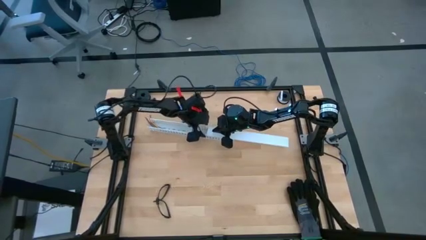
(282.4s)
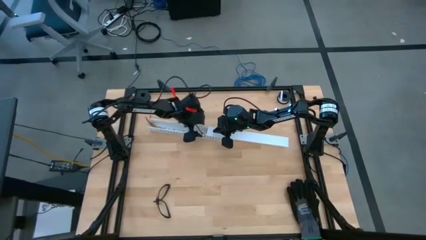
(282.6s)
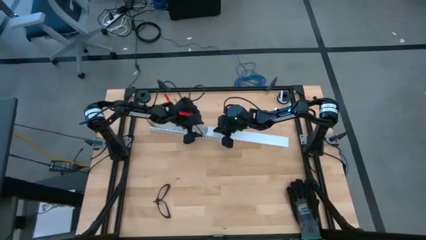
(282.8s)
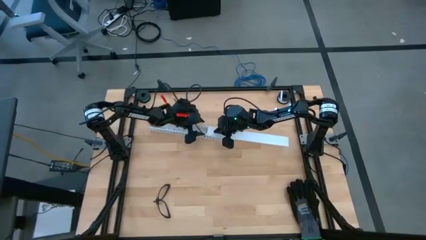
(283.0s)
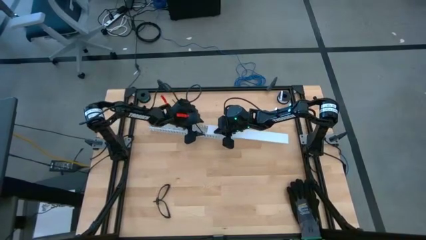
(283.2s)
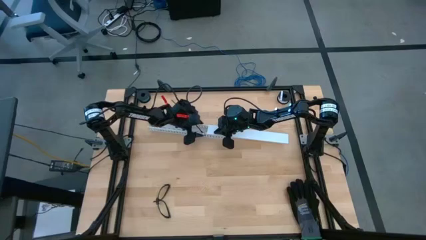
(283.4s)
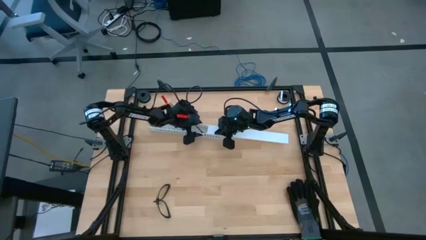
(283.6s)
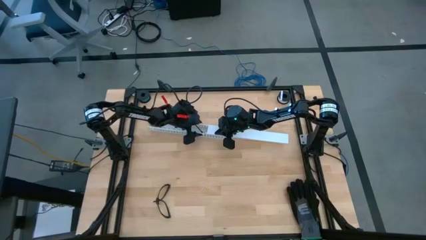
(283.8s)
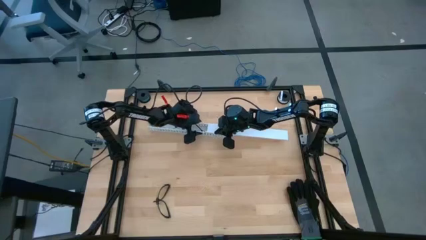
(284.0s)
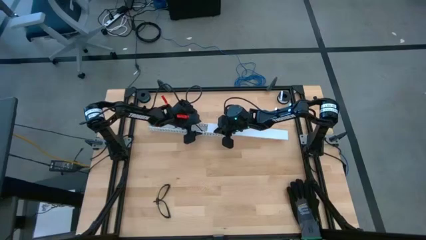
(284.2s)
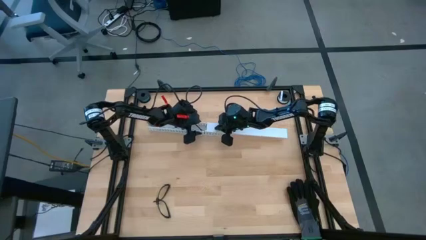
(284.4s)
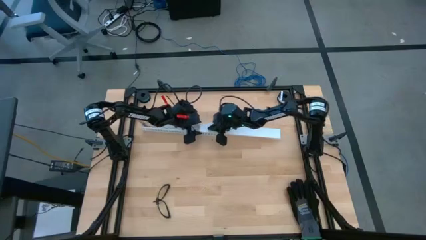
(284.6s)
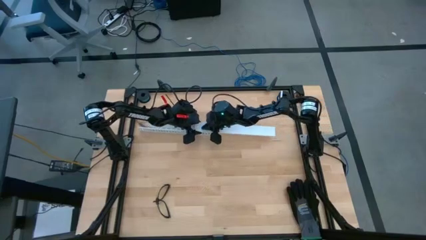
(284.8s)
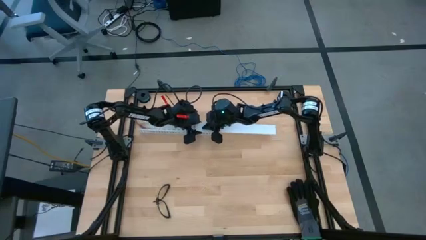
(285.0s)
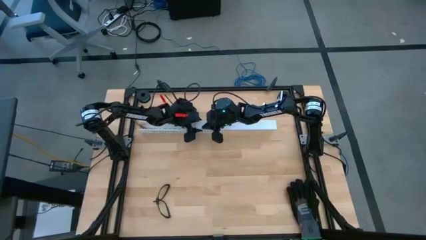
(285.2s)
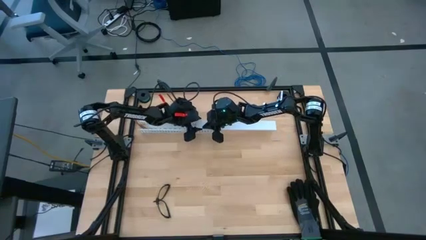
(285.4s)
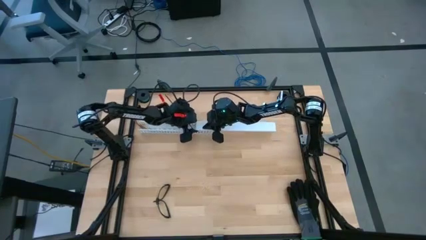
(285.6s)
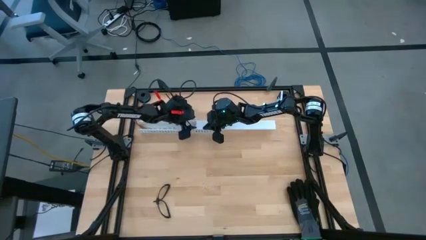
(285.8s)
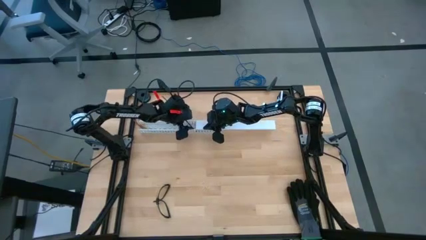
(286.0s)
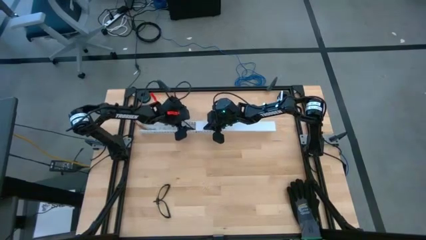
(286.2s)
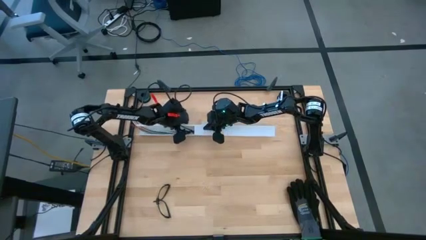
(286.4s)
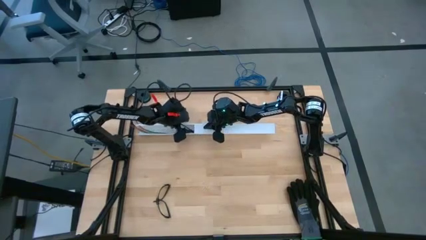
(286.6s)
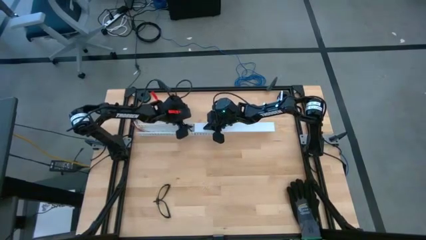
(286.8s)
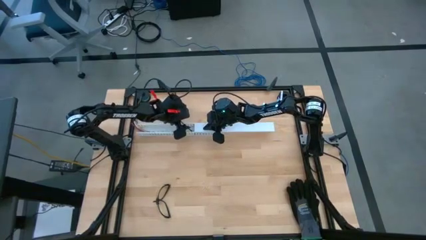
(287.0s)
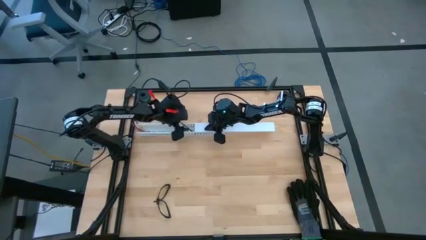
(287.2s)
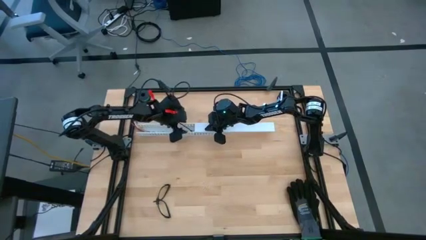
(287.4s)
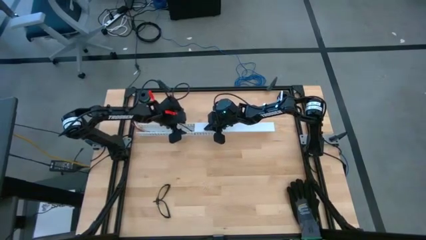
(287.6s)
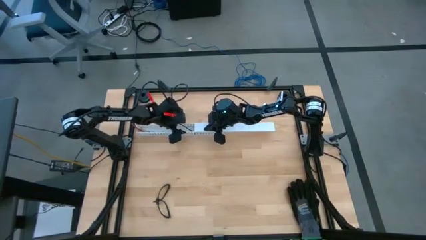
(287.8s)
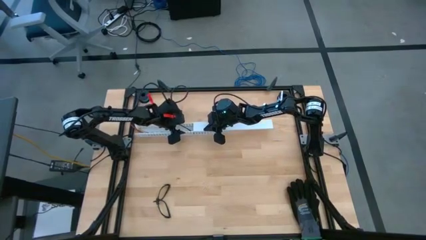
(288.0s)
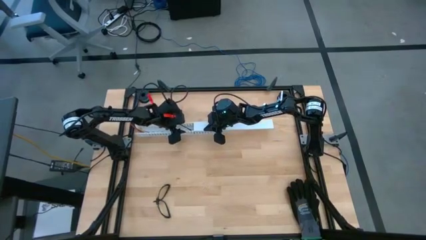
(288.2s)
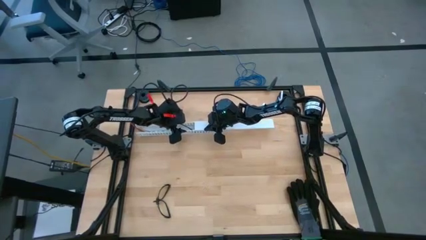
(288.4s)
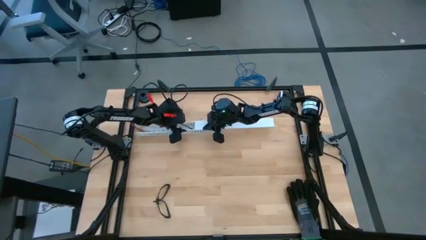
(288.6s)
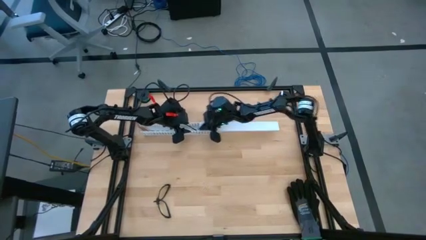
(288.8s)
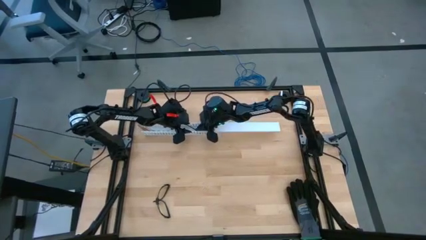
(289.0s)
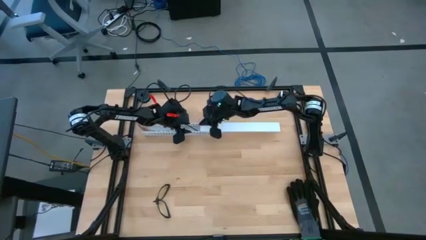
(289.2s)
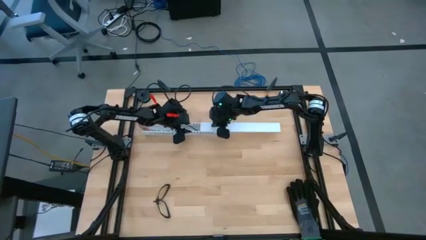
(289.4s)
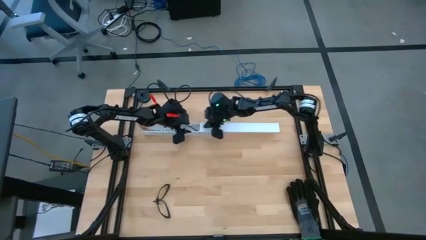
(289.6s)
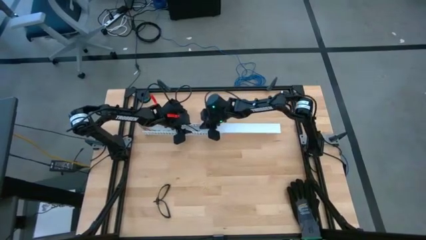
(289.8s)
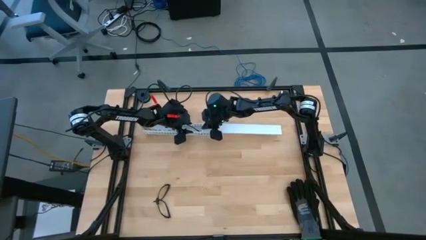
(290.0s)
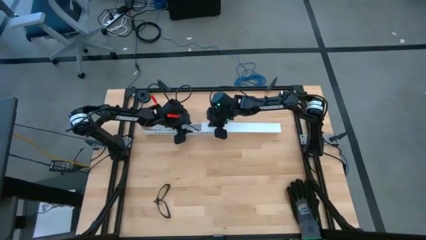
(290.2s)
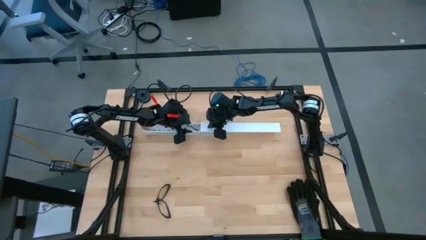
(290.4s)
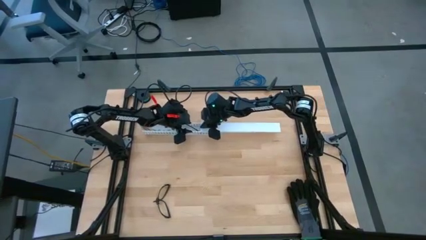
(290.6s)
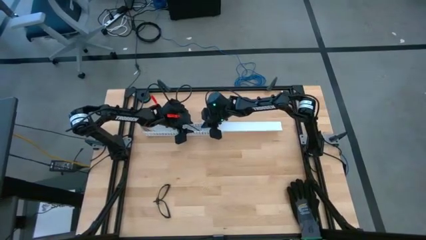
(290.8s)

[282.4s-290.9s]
Task: Ziptie cables
Close the white cable duct lid

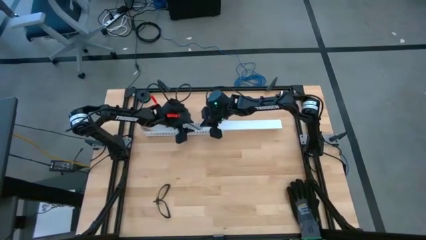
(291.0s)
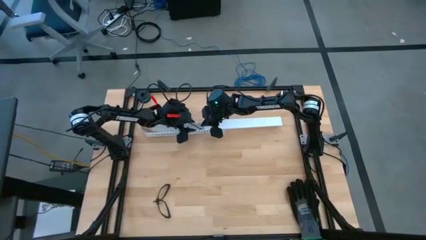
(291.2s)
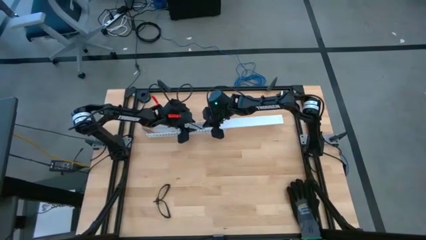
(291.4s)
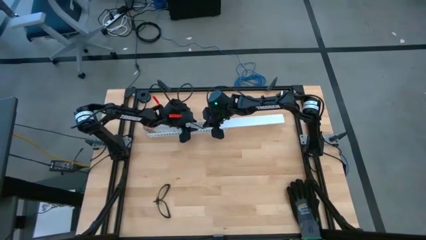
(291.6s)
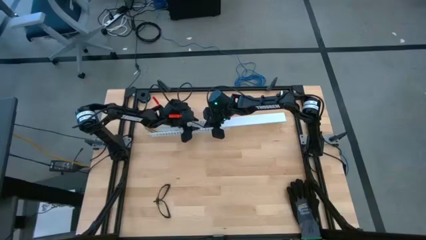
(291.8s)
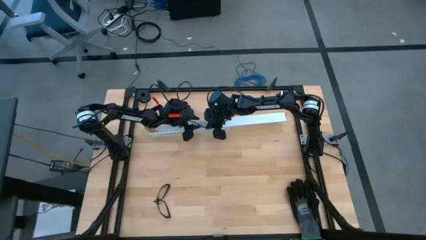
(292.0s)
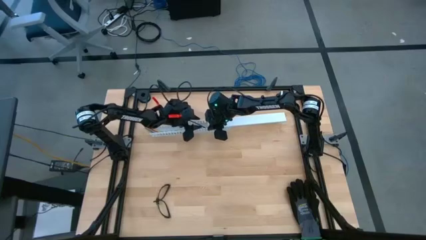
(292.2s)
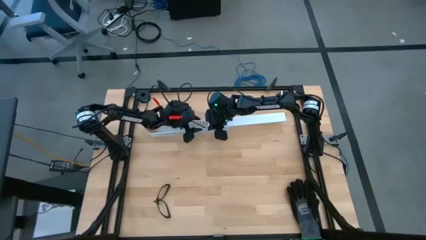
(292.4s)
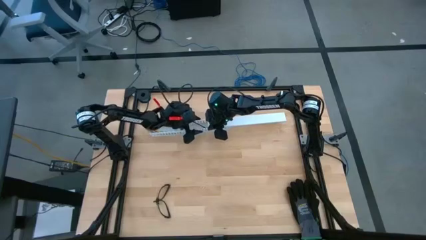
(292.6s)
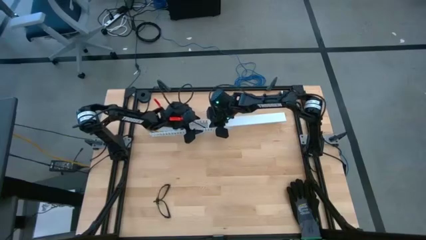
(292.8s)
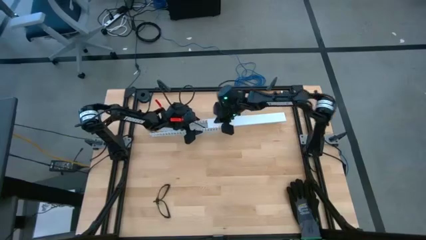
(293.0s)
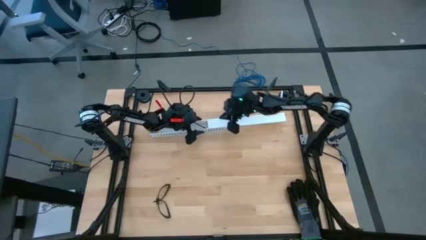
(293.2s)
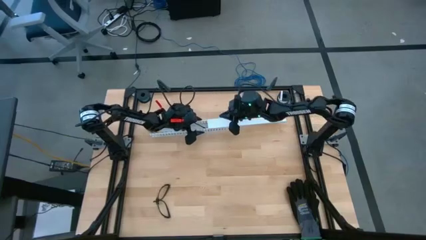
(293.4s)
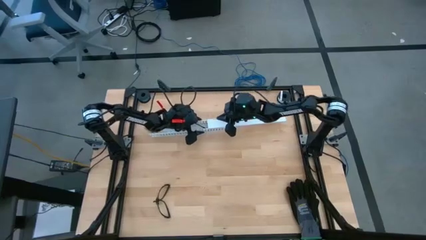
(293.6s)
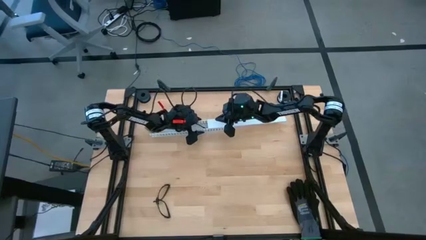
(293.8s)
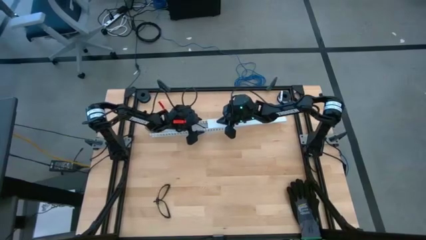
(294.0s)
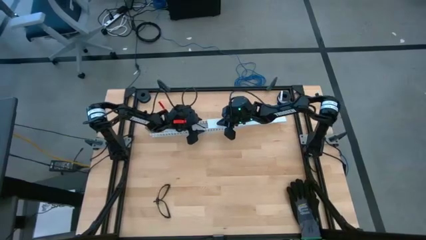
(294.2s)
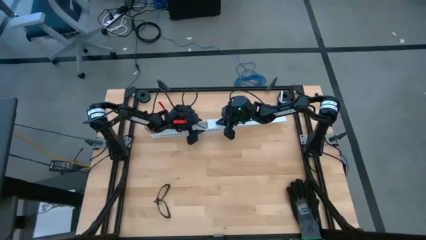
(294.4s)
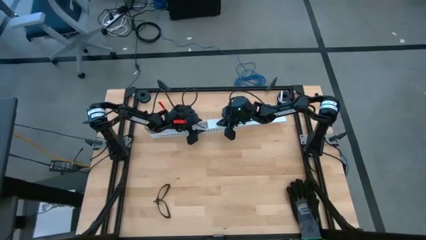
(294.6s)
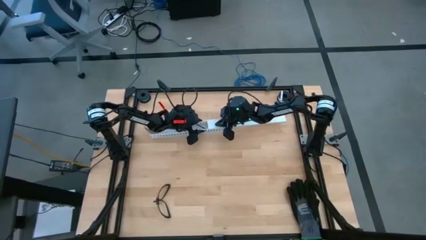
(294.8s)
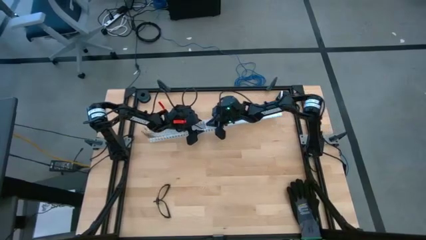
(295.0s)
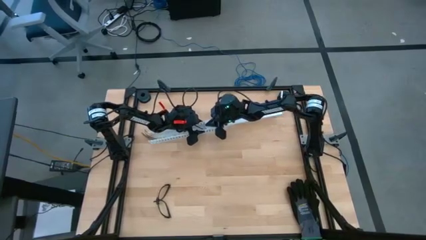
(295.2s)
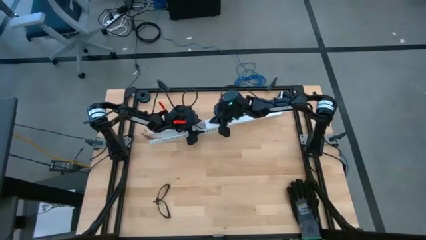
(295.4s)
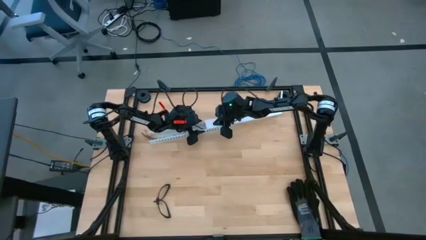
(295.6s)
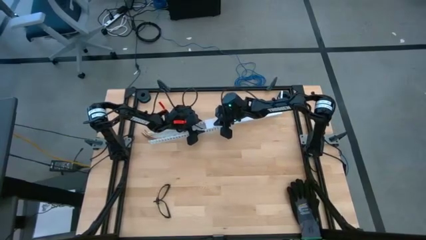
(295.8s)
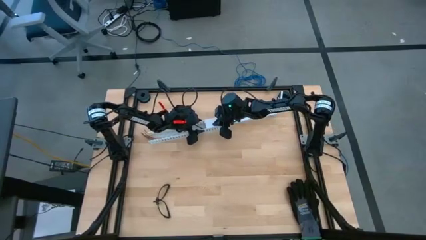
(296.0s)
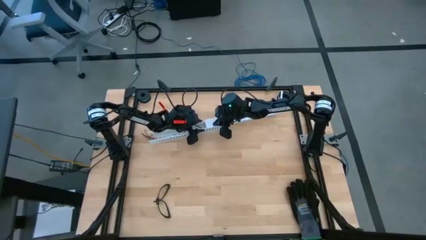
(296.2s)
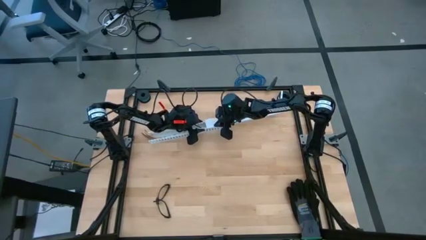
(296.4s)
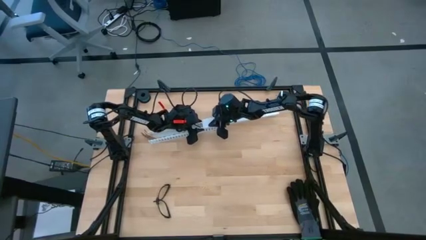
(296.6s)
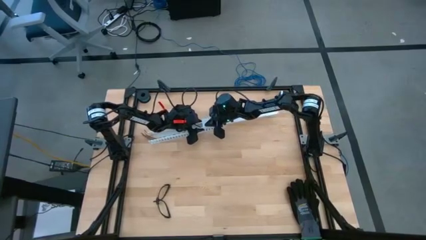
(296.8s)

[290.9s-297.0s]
Close the white cable duct lid

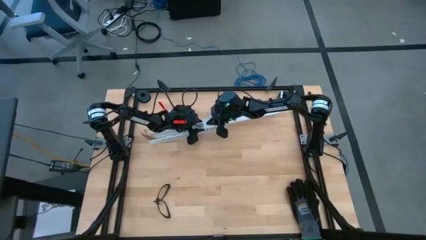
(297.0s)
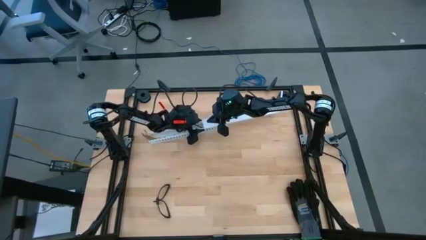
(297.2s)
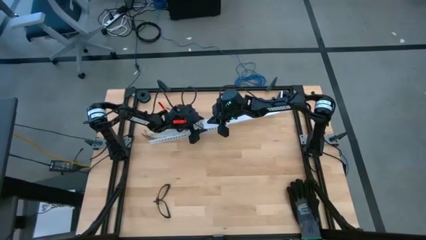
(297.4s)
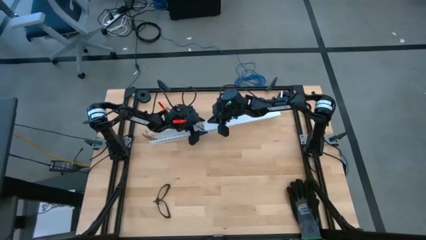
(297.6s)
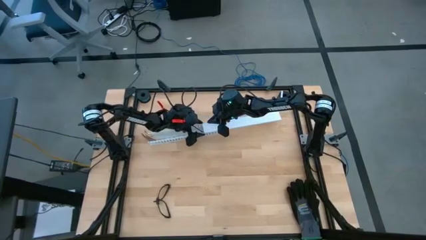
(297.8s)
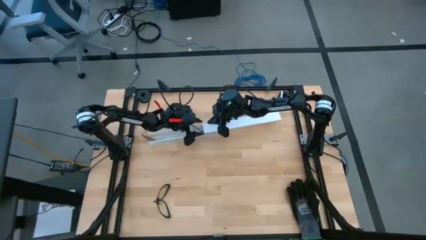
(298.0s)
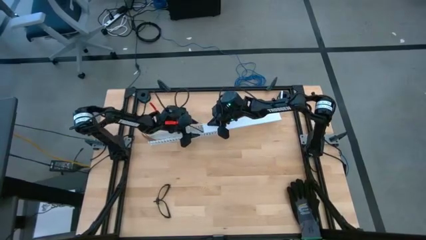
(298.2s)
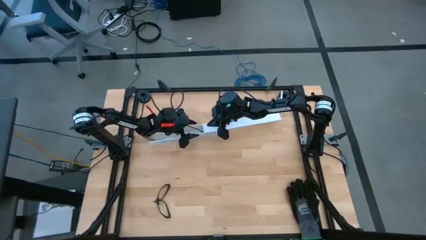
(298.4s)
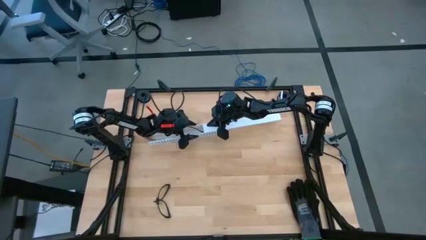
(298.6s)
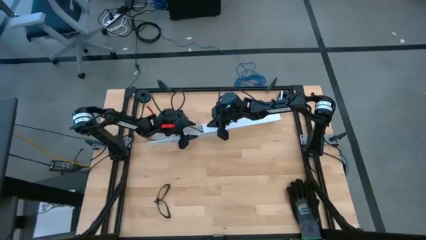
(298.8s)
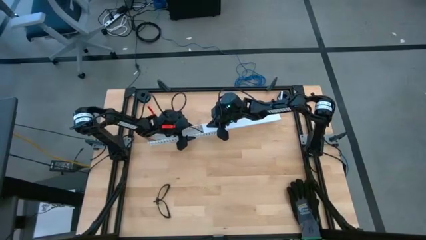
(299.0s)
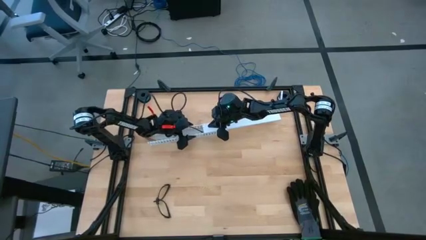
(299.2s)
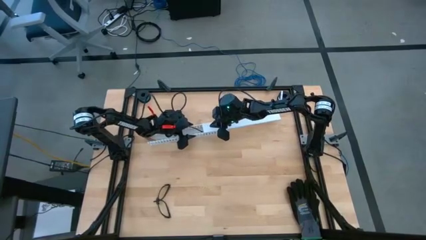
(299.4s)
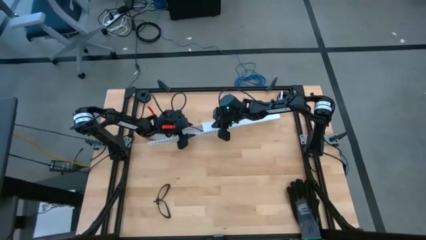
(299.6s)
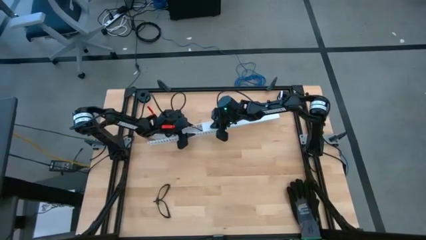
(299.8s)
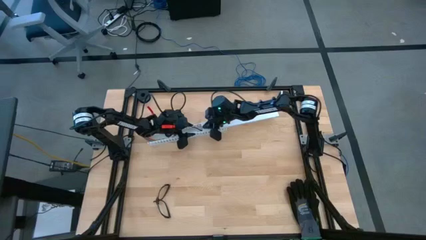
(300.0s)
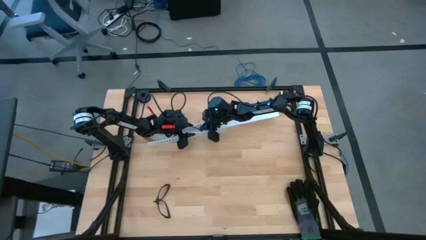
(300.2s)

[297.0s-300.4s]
Close the white cable duct lid
